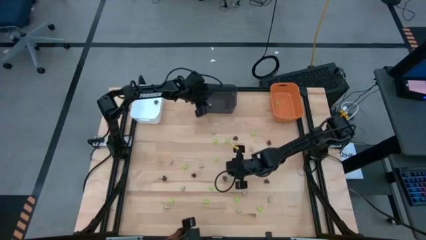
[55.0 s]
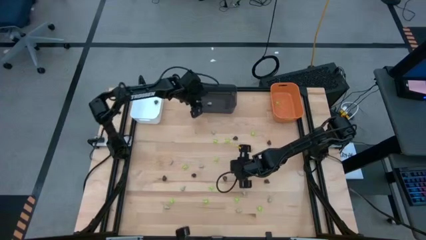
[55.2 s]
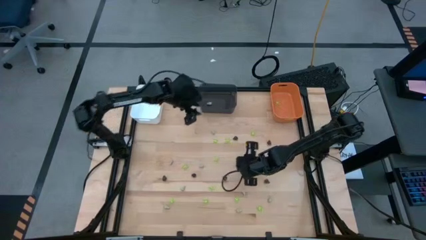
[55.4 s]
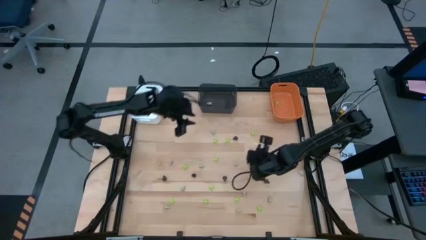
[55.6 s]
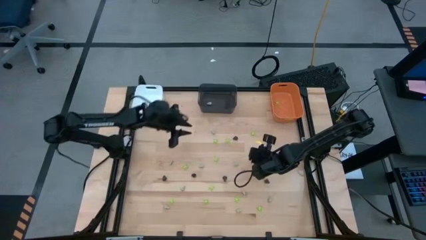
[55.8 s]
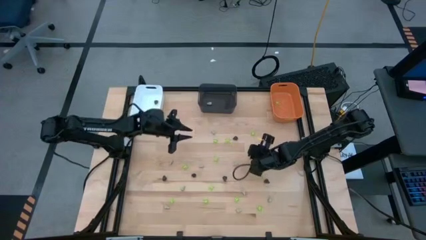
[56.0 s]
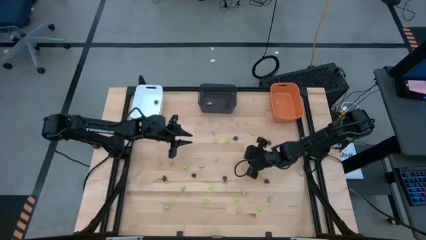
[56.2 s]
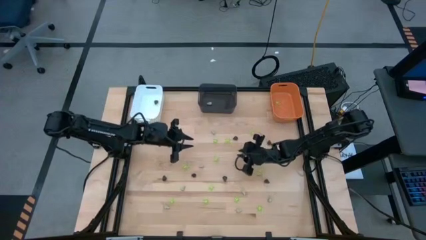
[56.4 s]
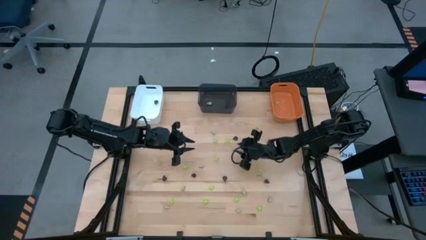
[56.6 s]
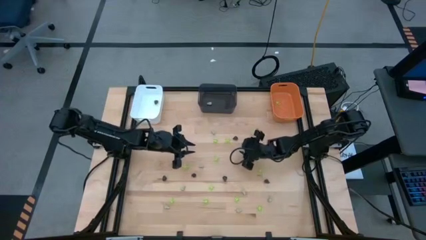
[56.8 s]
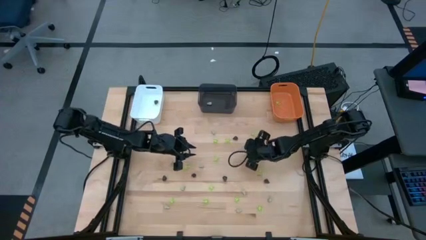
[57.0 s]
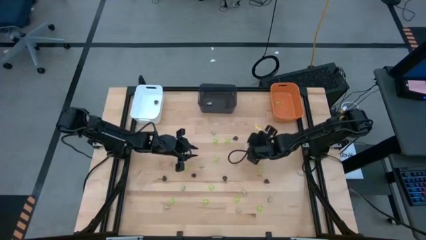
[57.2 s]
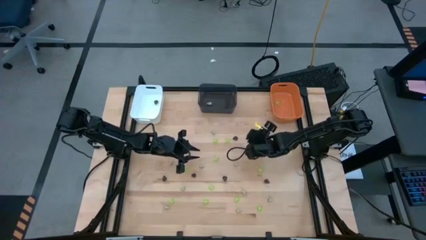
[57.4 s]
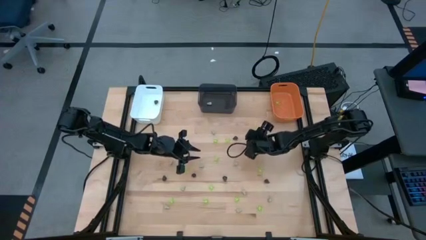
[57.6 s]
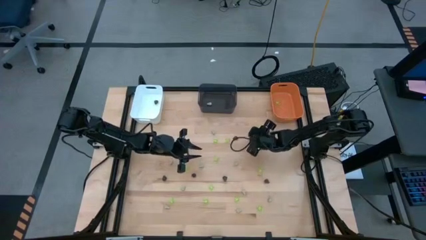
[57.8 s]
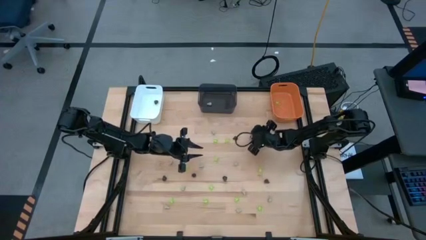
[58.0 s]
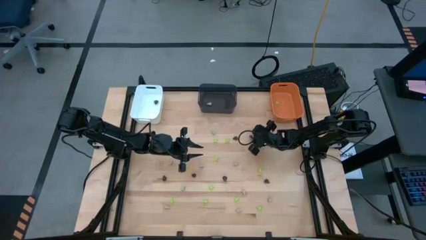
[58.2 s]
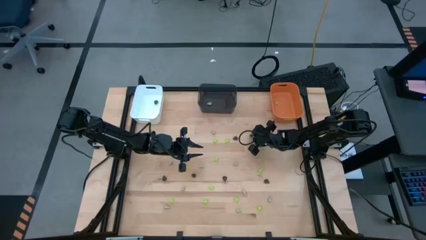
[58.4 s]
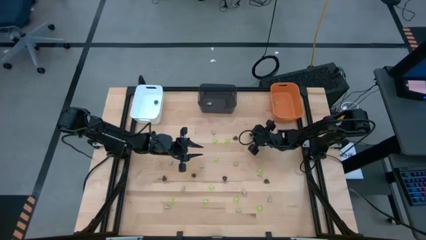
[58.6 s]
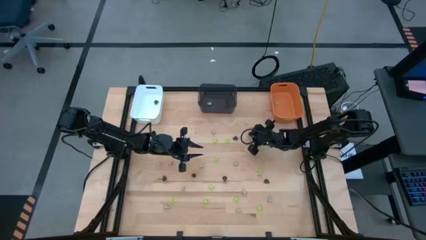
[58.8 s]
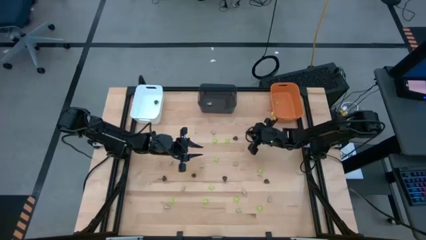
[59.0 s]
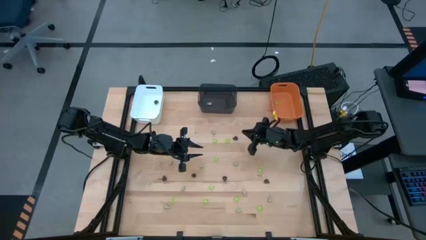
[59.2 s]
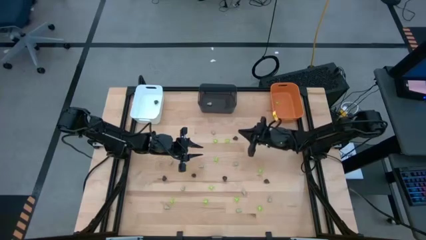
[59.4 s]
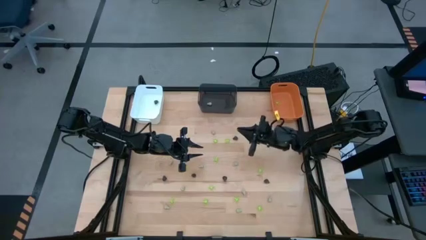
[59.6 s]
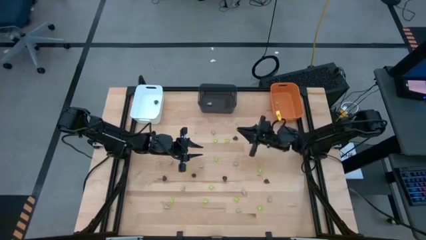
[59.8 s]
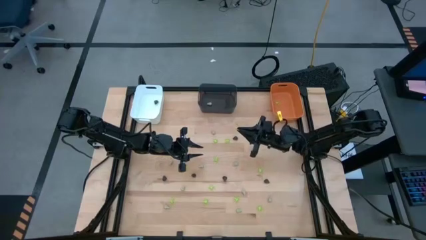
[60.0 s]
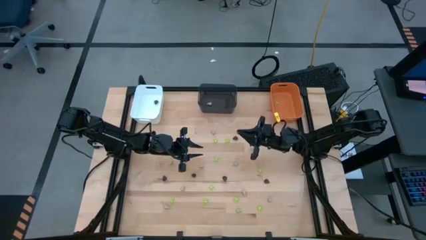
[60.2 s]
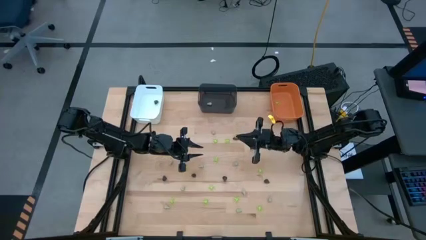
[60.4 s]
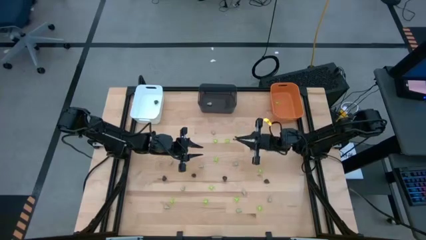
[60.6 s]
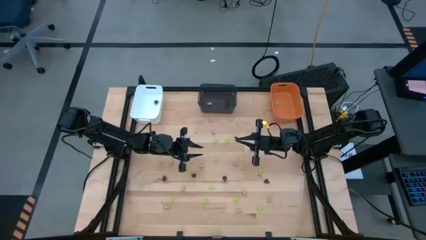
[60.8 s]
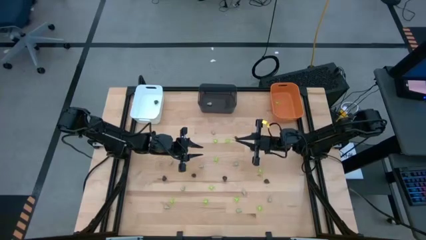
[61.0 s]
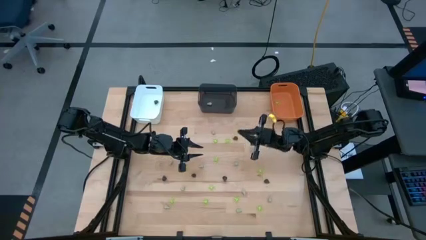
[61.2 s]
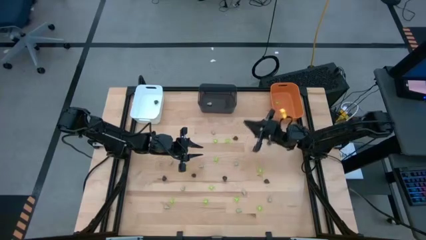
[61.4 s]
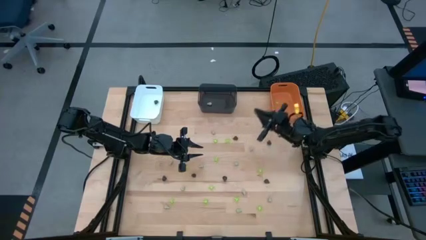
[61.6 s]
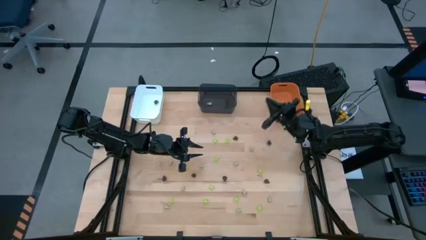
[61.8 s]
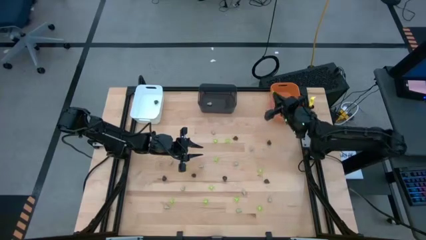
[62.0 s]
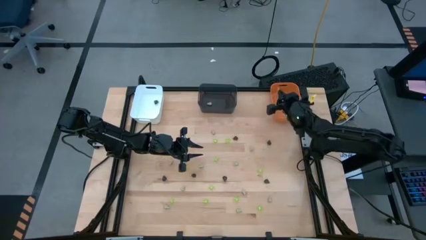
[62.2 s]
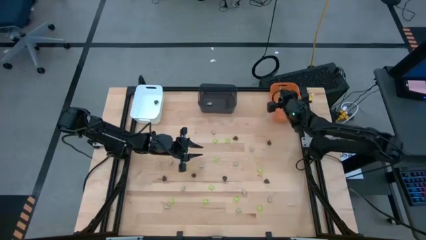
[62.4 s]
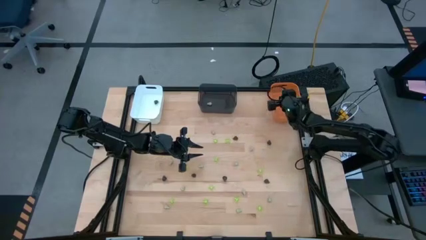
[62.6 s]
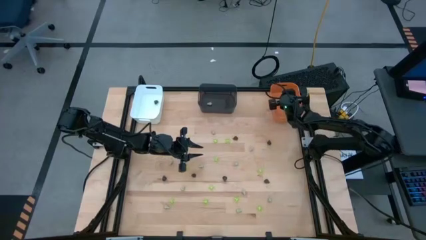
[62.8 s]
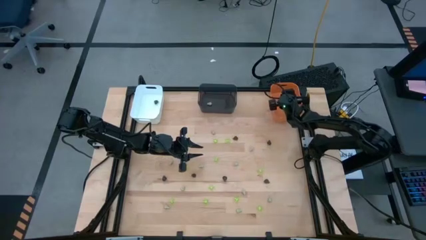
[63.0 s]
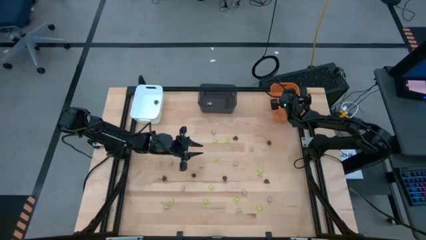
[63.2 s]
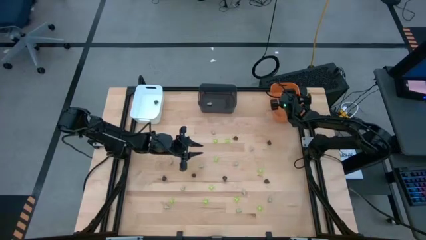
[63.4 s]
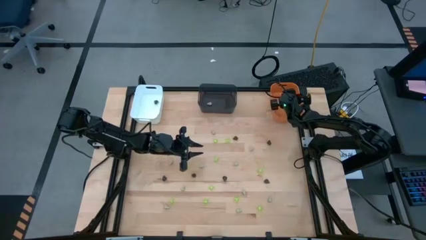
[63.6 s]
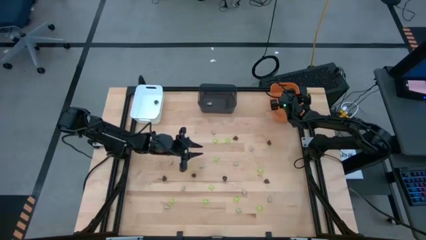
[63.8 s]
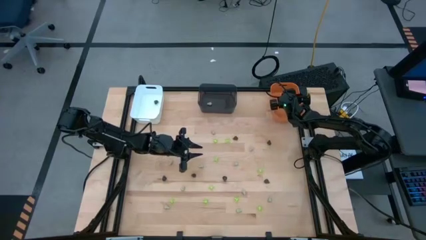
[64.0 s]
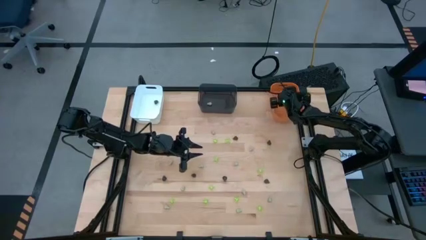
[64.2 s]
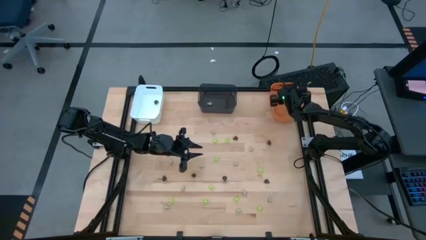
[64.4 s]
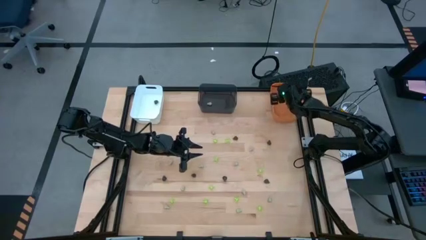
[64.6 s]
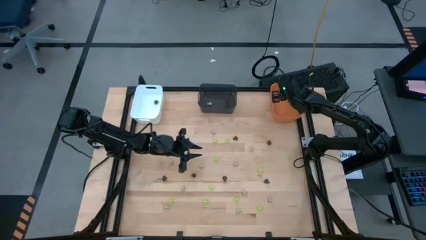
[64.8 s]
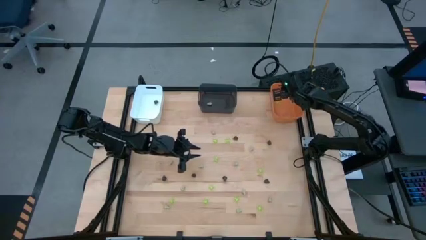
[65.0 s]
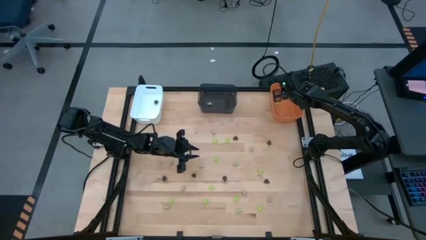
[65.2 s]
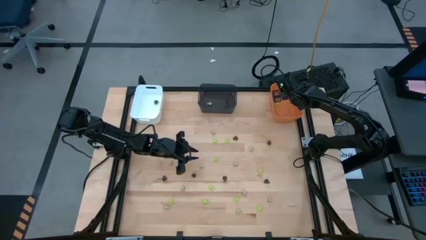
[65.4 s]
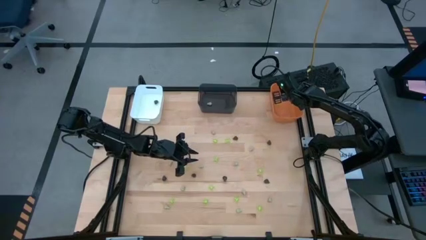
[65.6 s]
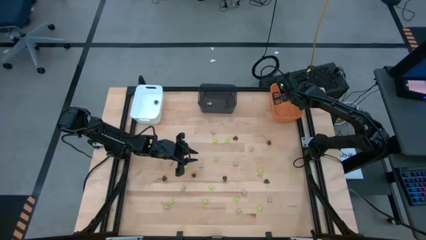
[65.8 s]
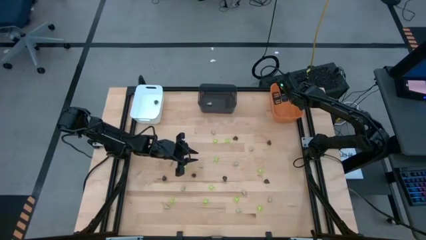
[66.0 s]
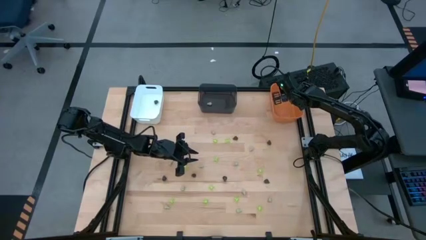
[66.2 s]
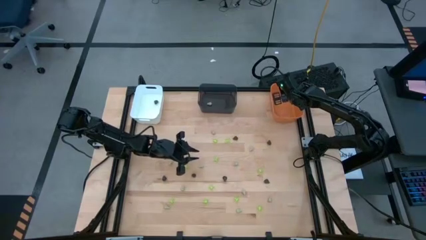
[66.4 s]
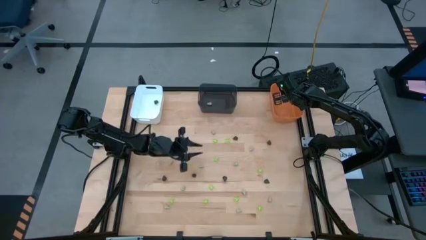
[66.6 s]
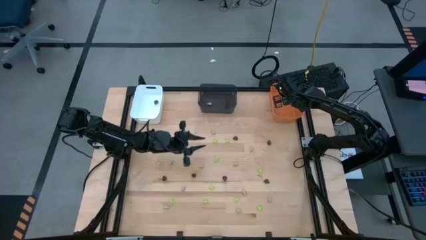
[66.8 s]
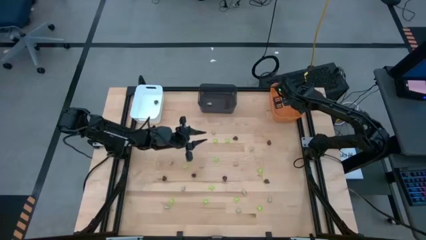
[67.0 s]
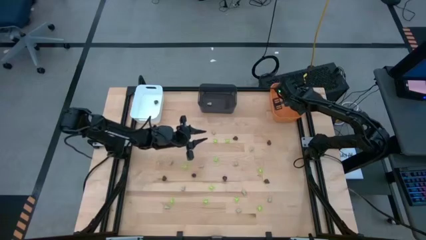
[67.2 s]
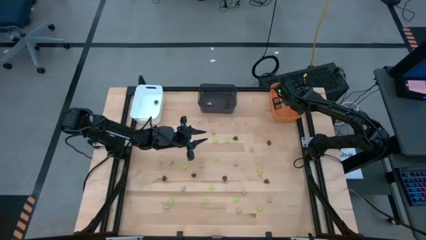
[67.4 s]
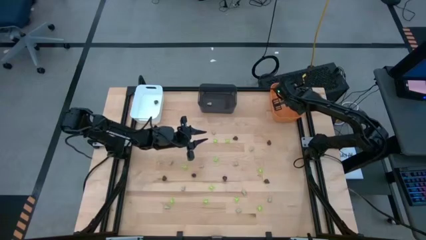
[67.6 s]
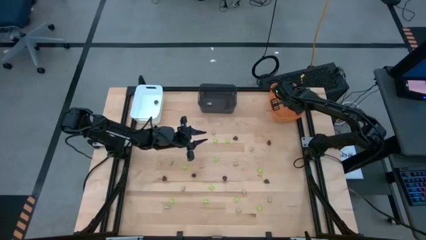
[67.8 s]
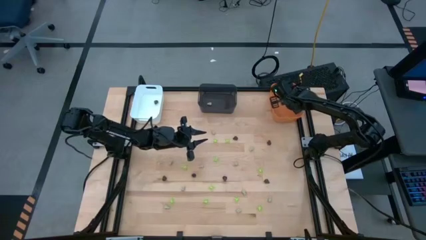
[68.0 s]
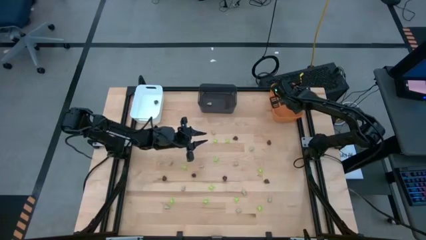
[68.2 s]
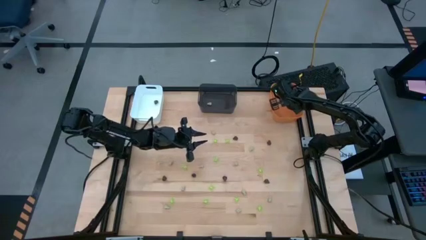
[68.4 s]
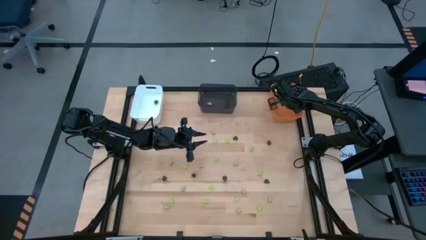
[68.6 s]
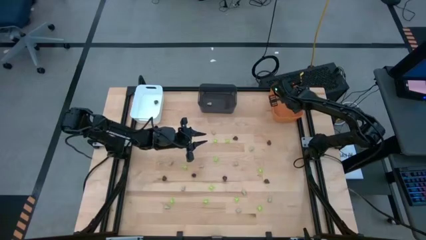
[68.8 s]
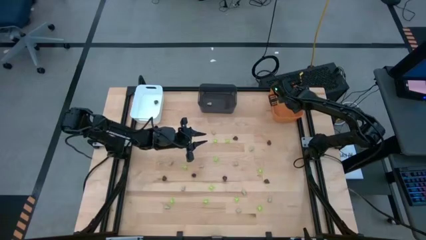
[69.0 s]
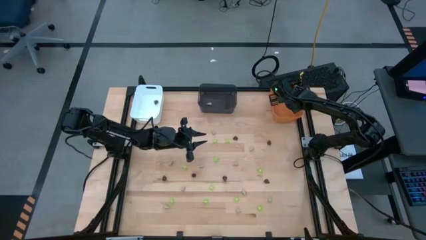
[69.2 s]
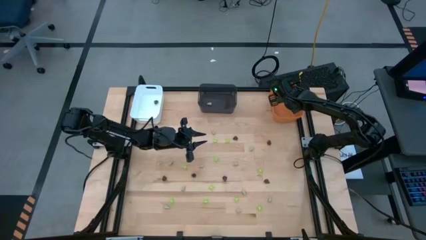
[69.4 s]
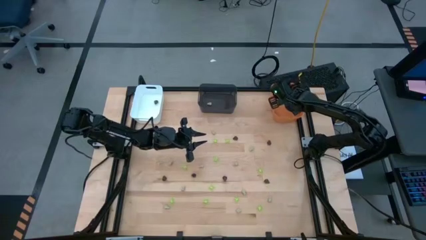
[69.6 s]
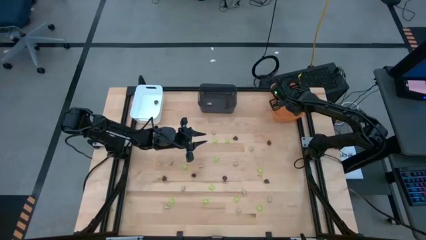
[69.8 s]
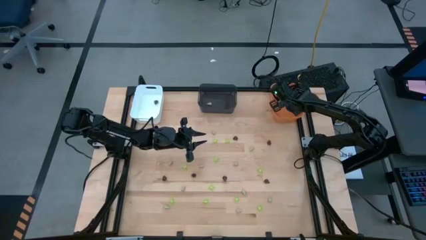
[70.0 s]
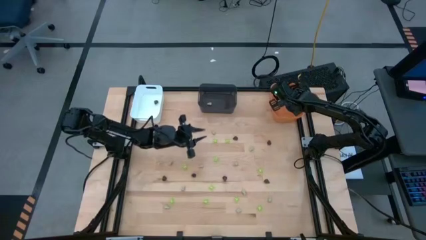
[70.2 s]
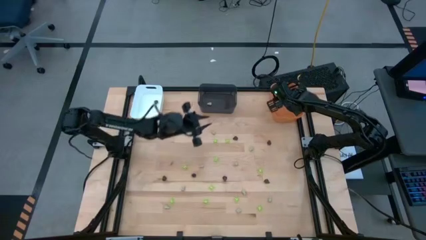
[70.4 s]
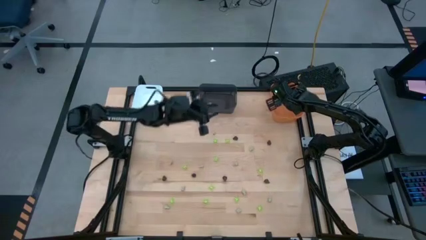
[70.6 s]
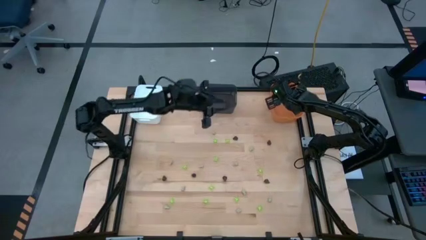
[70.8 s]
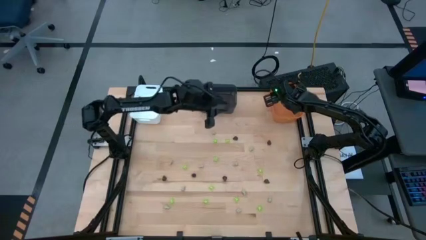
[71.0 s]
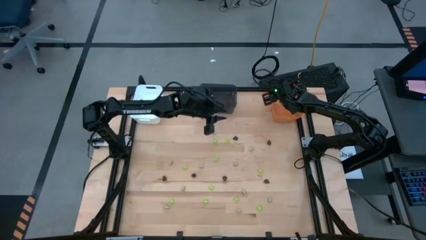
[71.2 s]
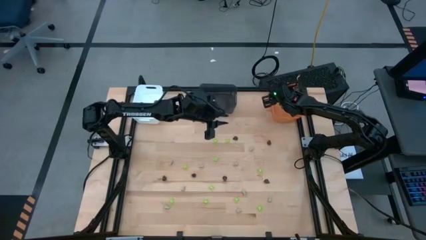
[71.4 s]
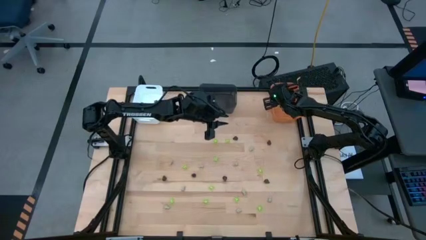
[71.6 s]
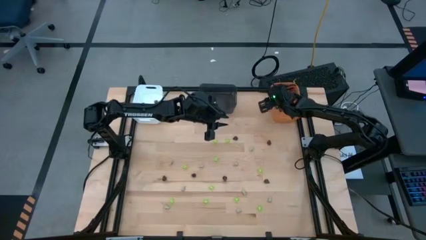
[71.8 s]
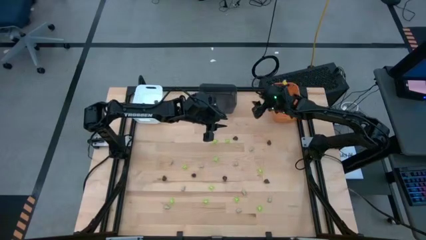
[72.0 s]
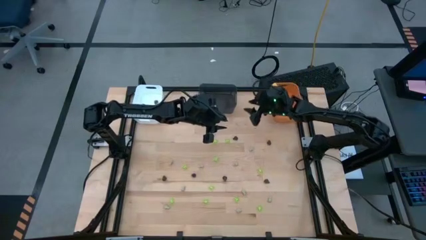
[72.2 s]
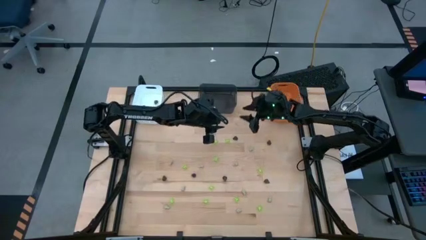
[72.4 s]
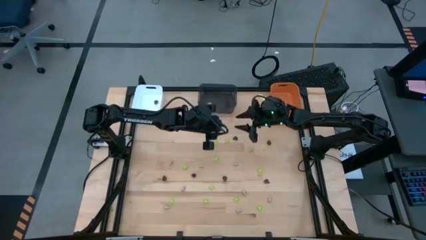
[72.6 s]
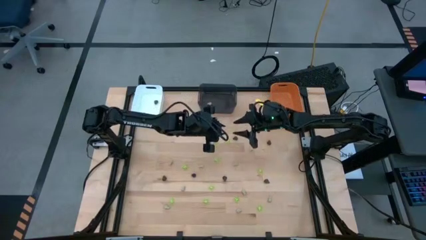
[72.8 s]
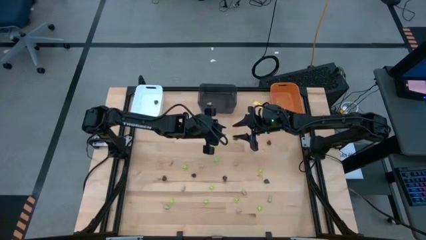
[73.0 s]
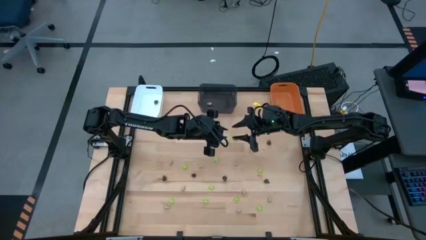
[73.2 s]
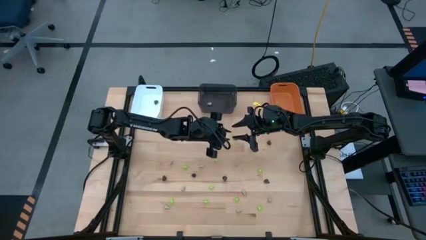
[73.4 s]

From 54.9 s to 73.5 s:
Task: Sort Halloween decoration
Put the green toy spider into the orange bin
